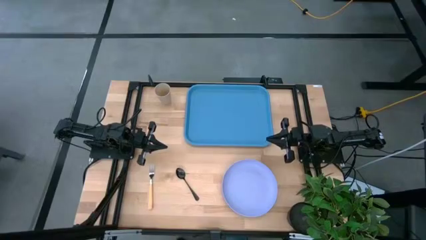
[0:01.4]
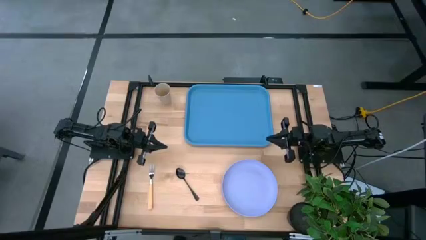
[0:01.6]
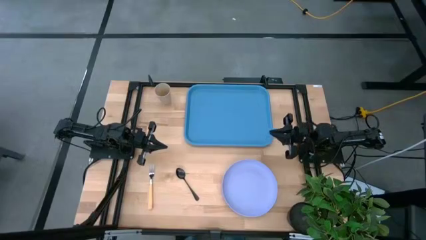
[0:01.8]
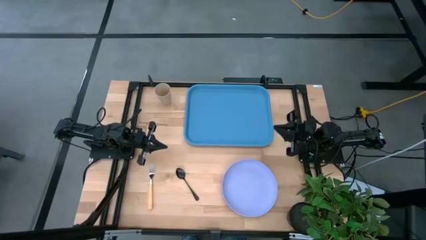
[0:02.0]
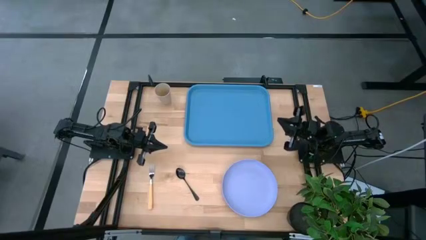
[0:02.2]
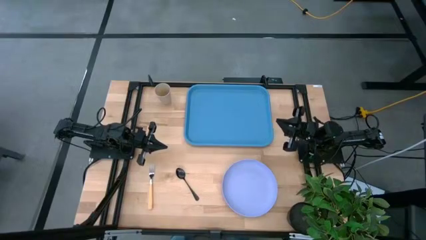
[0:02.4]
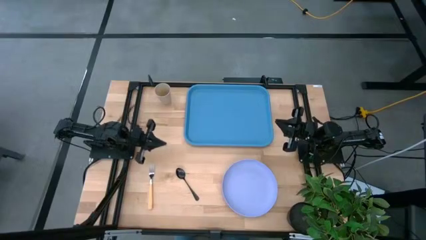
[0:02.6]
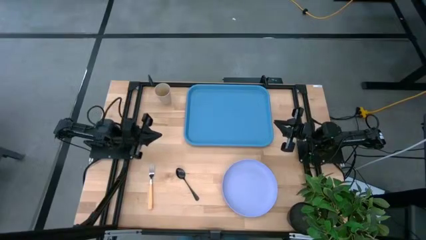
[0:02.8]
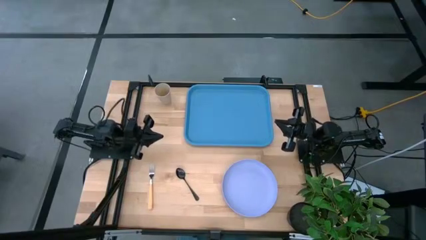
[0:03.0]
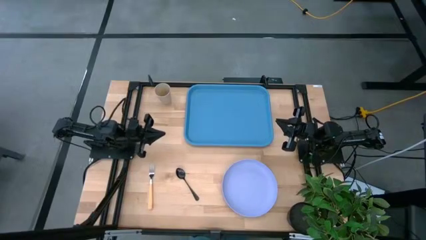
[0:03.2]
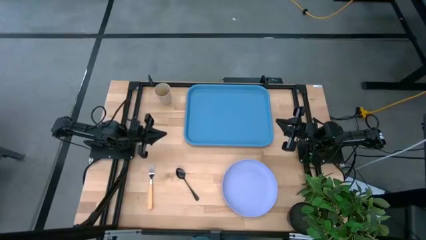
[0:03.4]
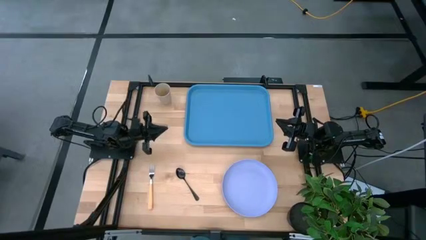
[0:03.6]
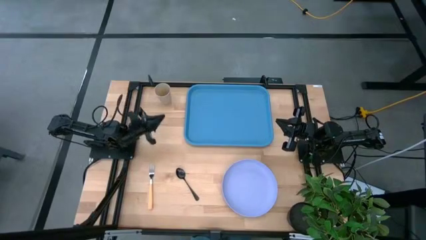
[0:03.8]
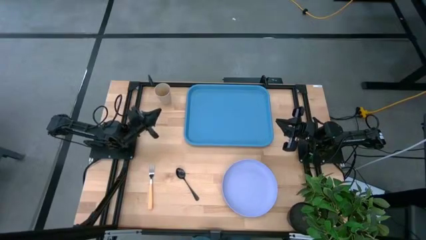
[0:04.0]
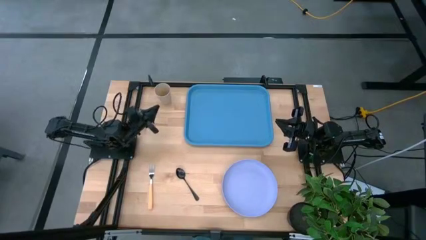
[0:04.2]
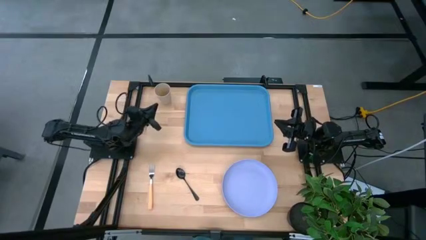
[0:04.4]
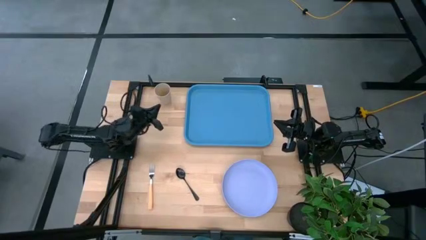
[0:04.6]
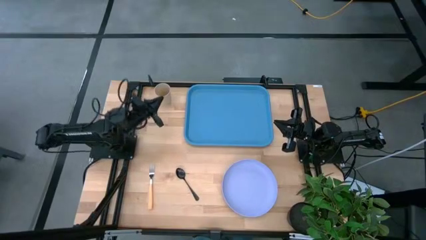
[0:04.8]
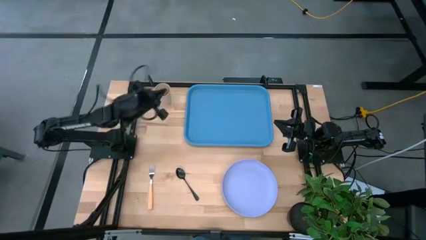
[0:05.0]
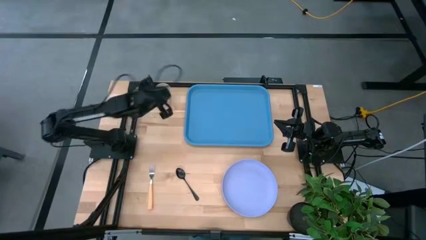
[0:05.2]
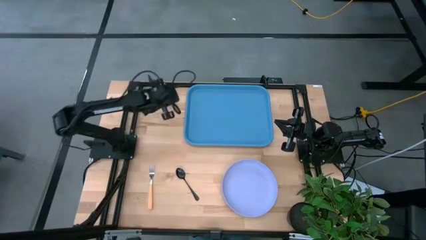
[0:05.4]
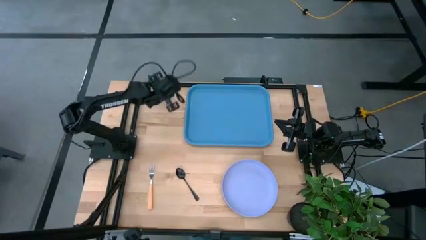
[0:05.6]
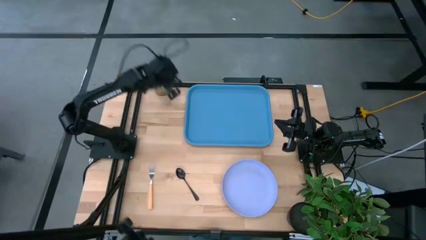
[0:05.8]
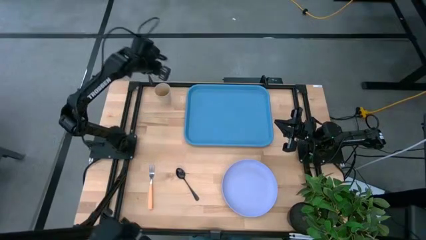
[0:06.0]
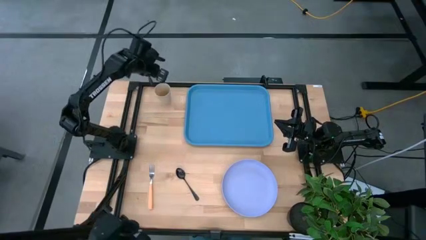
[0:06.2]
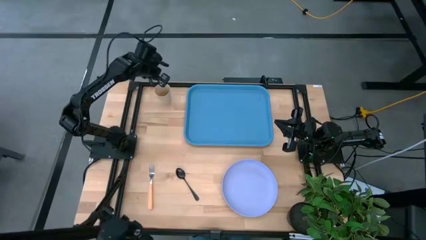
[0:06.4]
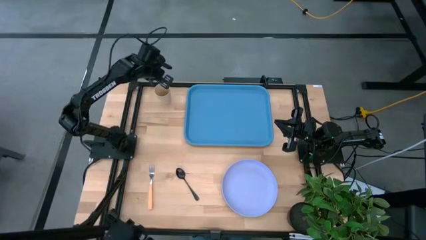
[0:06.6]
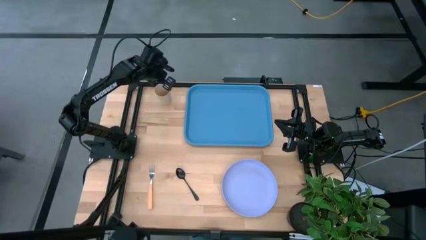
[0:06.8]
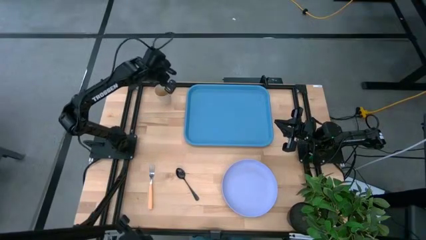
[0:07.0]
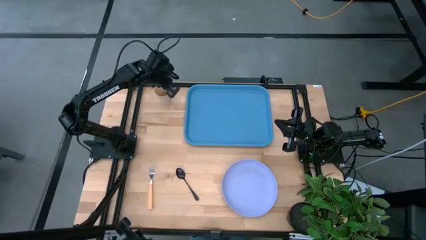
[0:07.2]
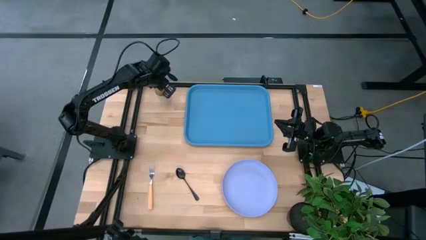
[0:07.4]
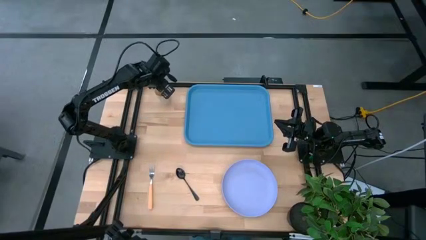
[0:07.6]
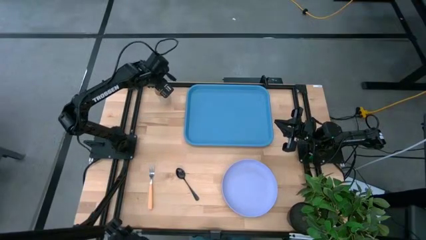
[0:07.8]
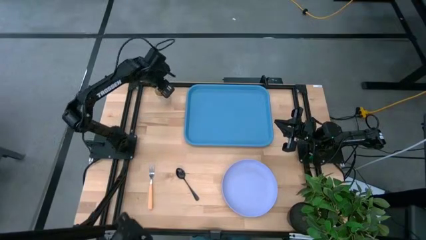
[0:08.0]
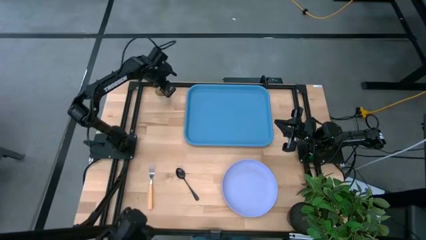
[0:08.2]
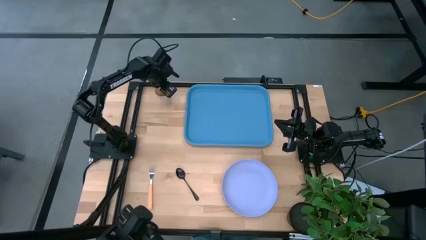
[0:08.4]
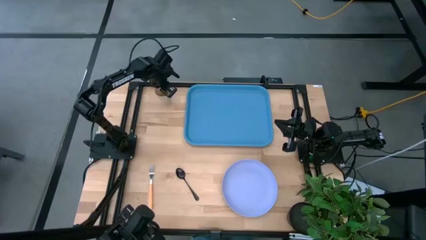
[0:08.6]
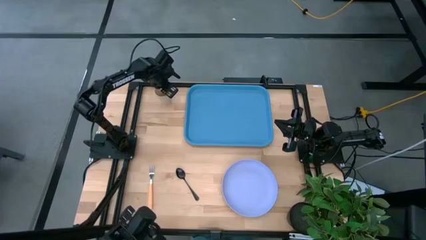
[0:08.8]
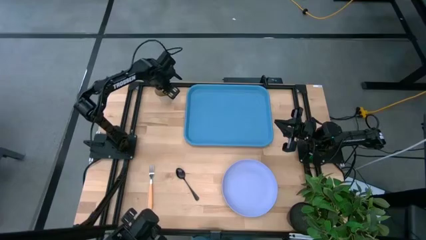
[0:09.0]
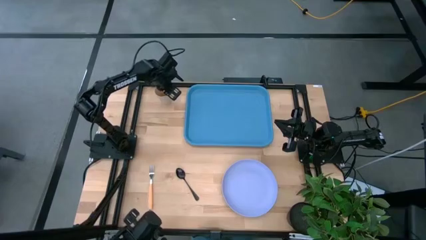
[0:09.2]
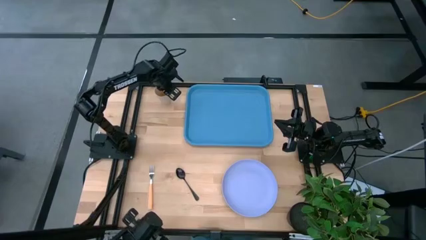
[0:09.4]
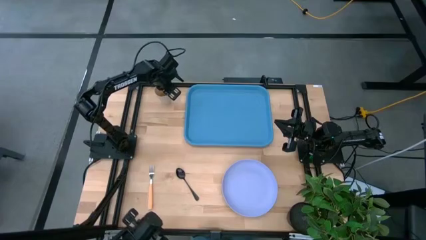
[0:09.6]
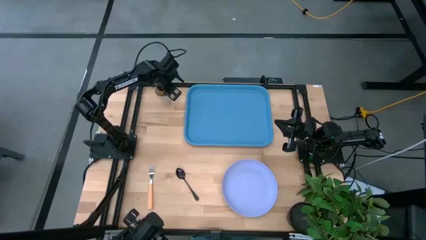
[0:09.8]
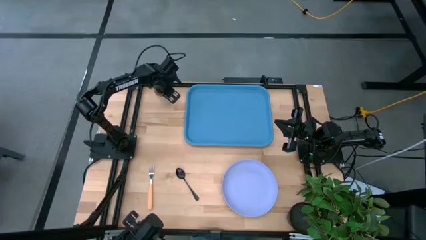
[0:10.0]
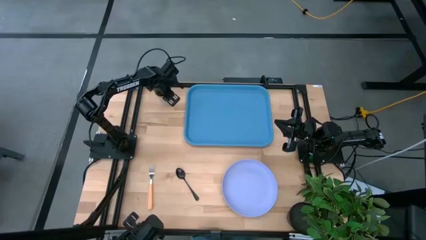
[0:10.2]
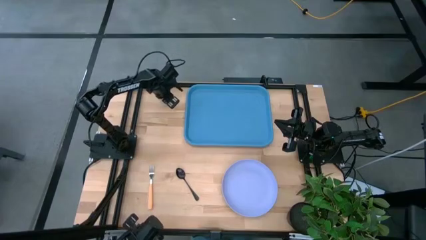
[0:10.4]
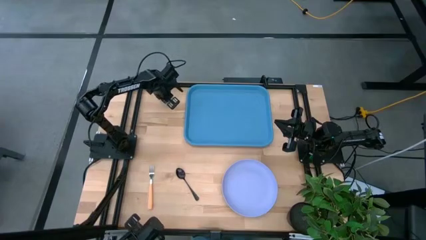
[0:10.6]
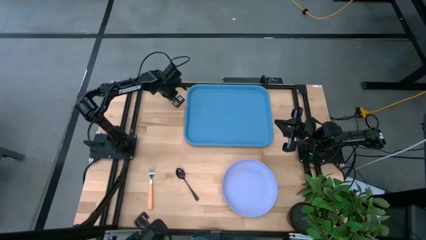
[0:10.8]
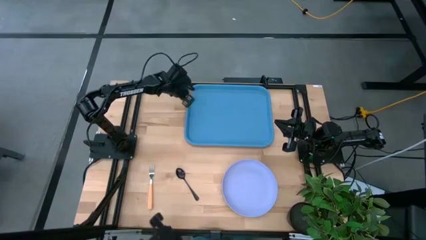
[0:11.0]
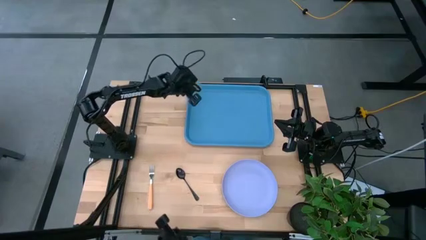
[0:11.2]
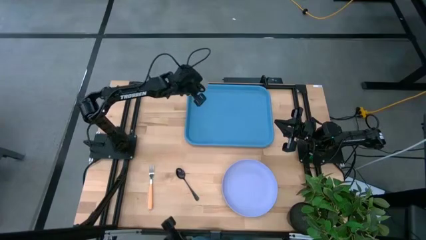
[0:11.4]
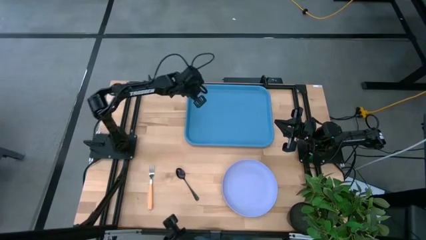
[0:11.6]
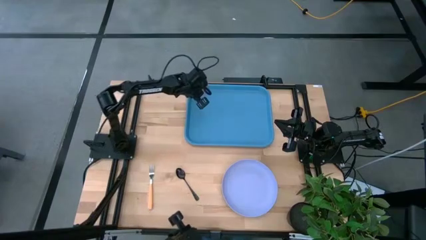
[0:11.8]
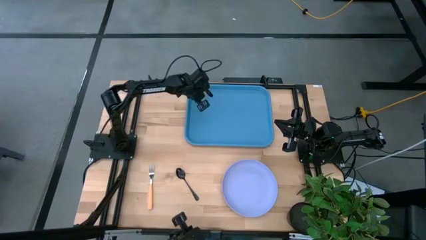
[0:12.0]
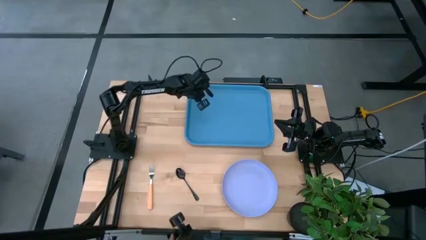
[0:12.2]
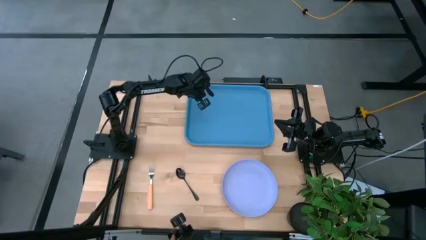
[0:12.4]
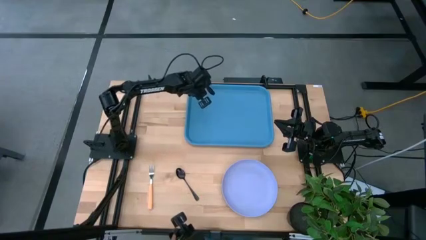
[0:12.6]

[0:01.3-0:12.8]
Task: Pick and place plate/cup/fork/spoon on tray
Put the white cup on the blue tray
